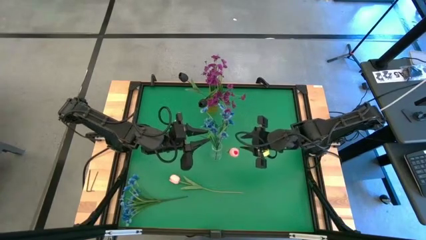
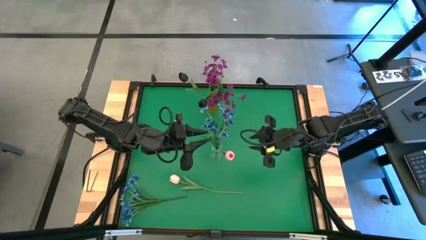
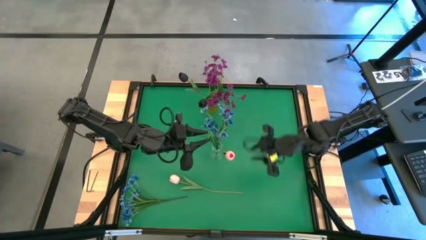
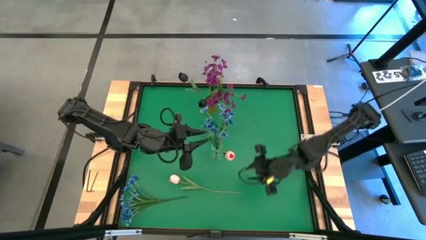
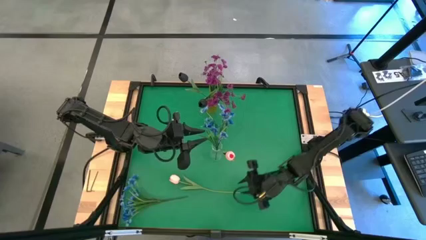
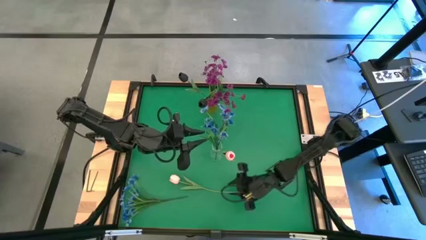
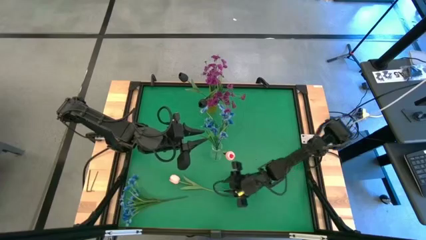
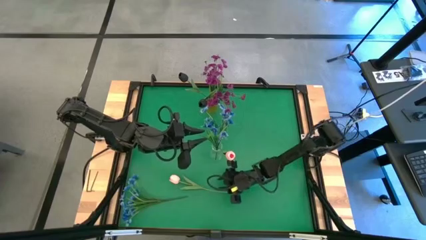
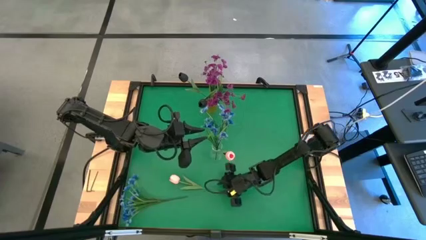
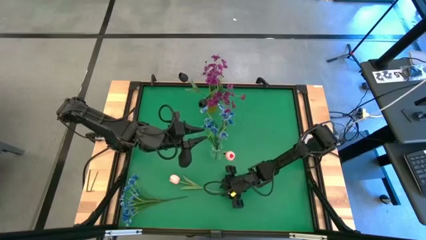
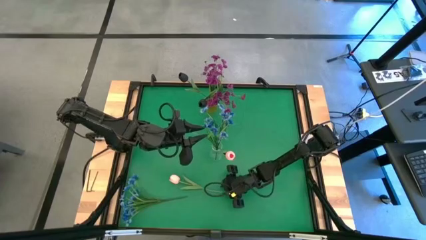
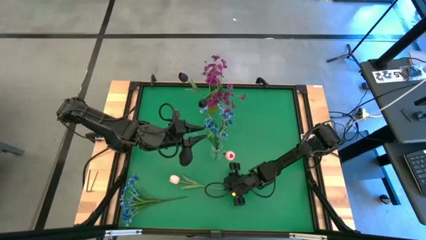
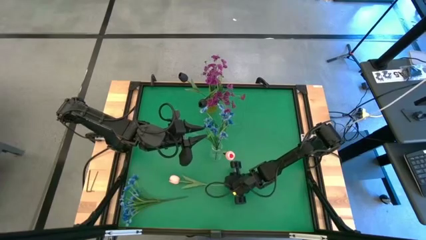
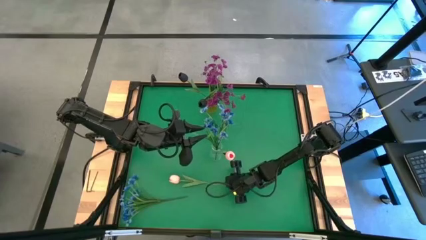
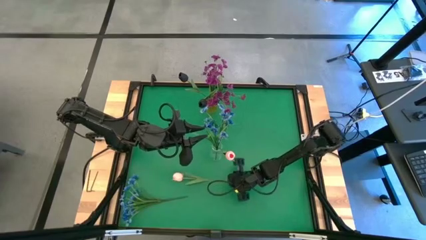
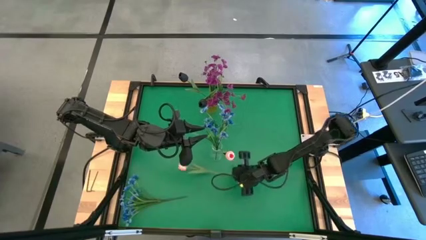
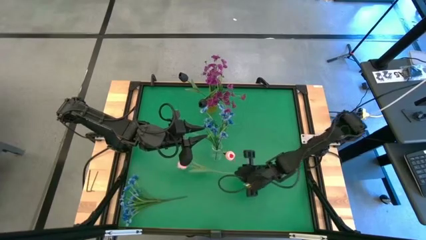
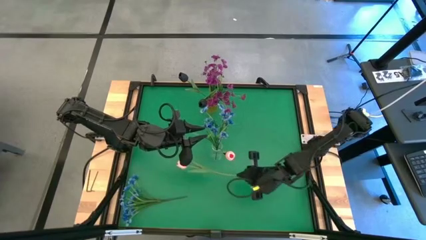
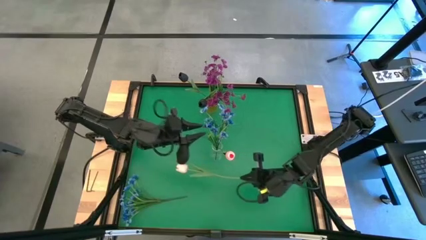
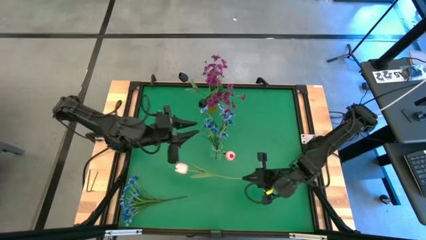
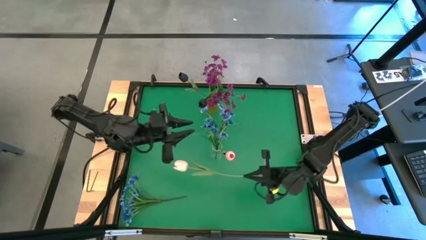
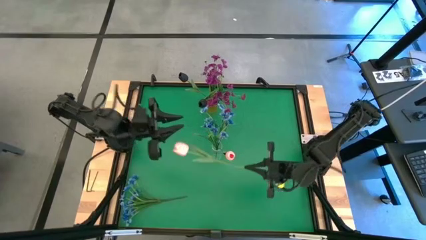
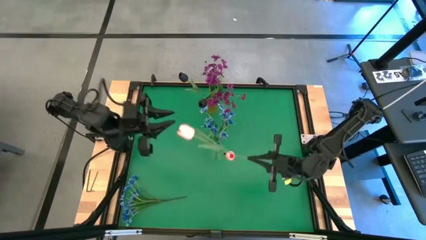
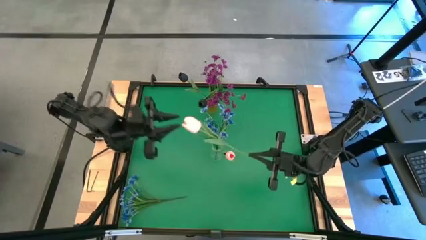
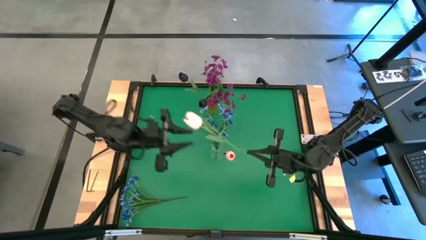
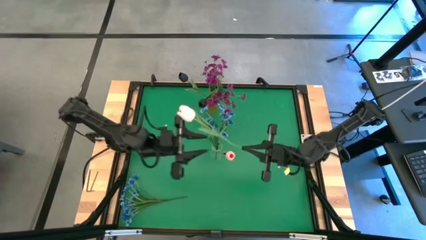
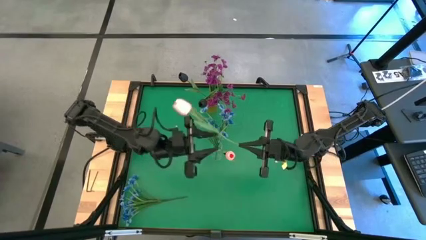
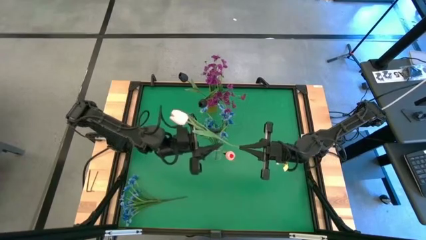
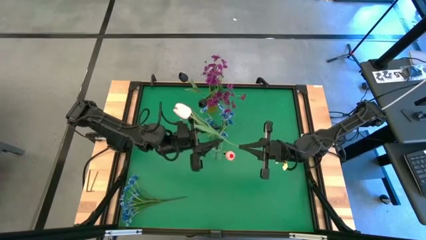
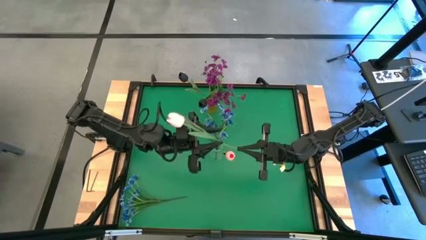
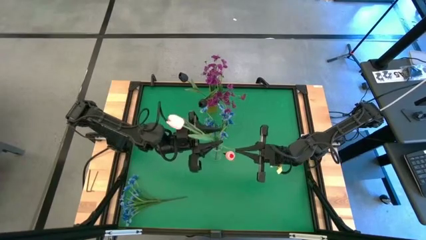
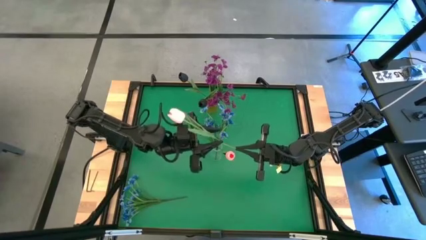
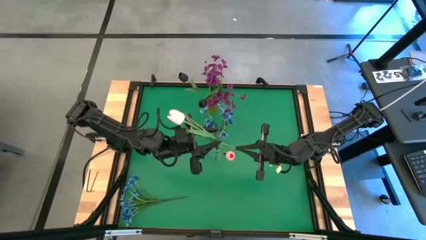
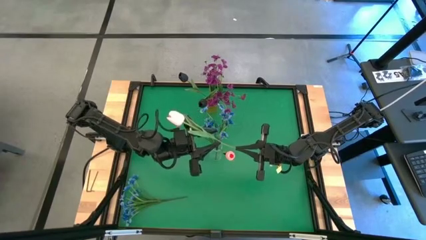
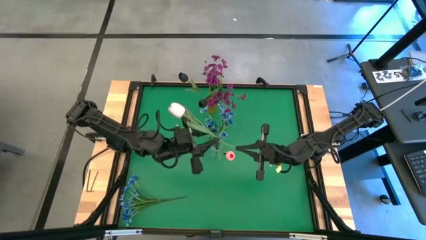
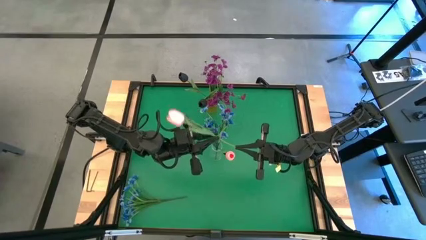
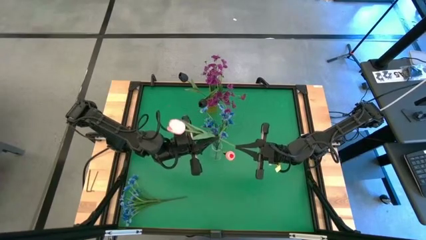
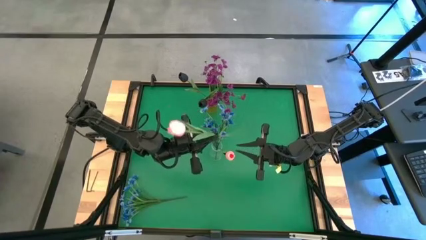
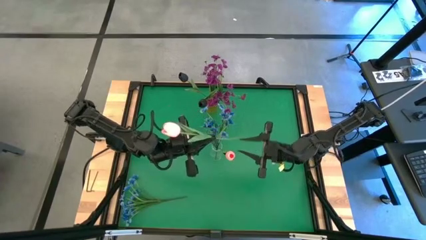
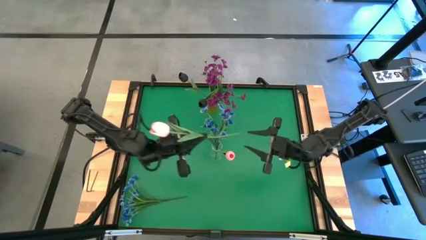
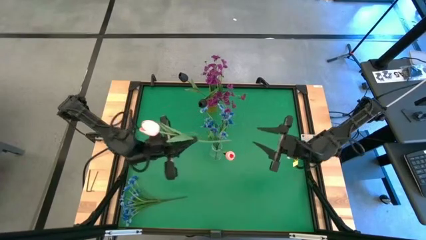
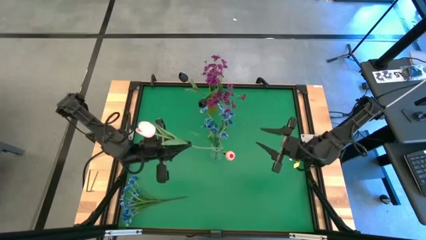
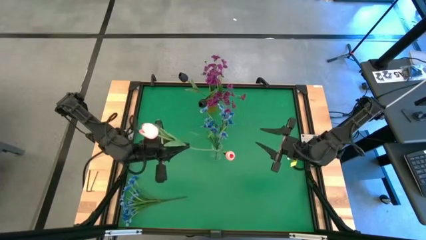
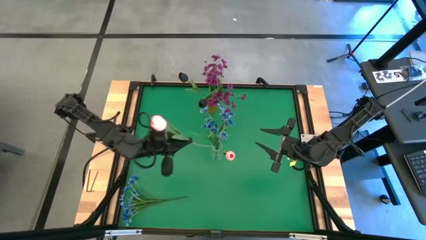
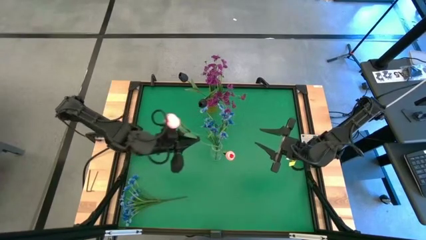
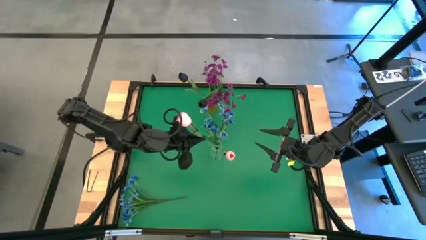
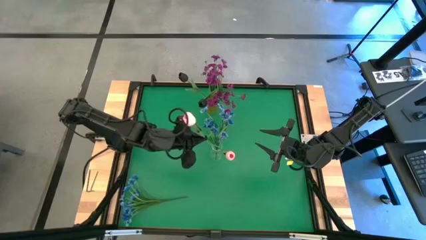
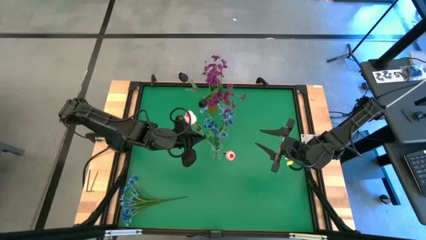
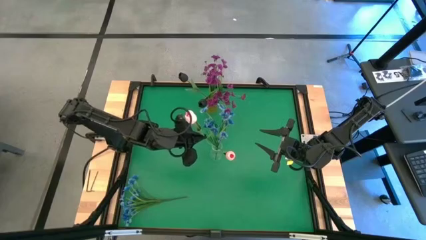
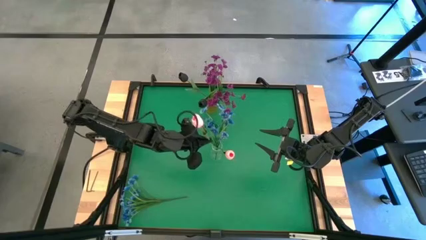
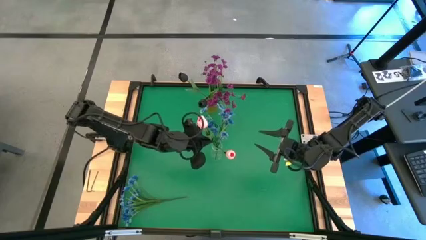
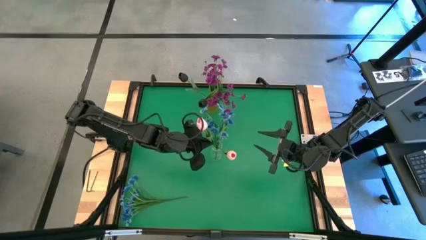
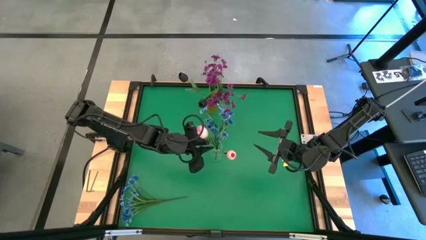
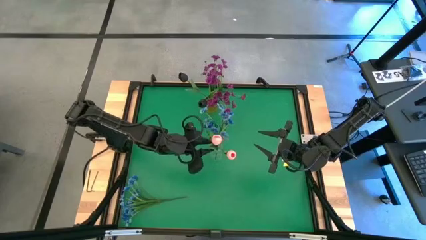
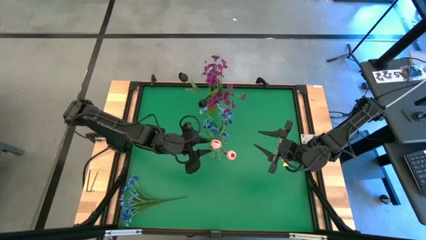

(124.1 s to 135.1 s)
Task: Sort flowers into vase by color
Put the pink flowers into the transparent vase

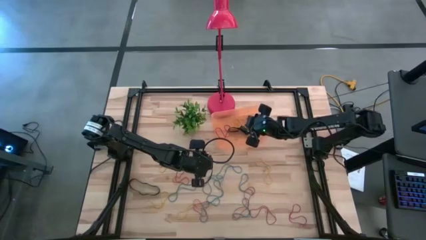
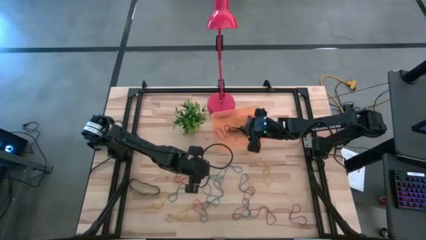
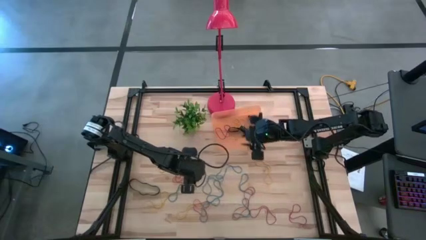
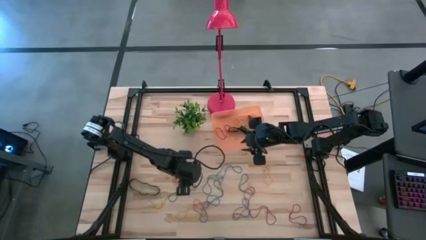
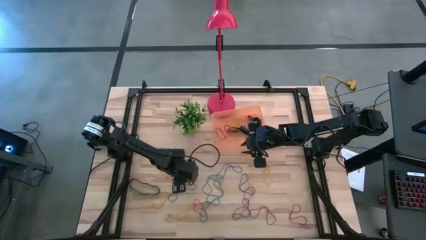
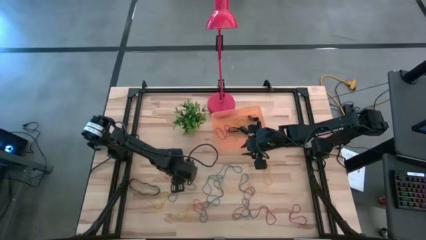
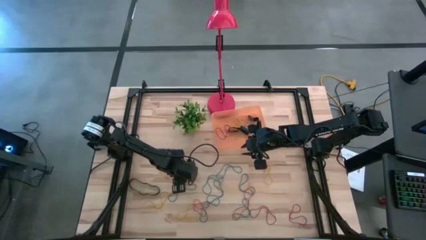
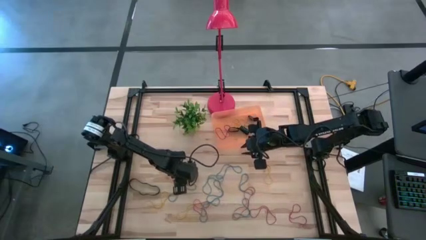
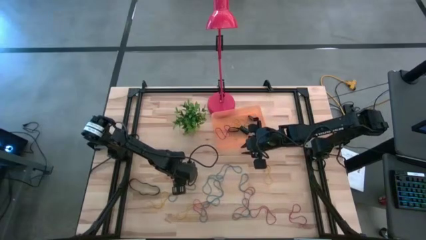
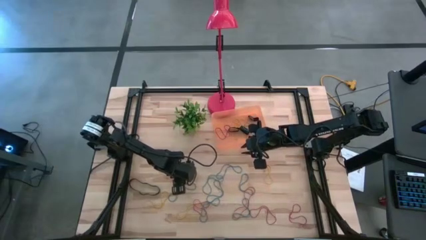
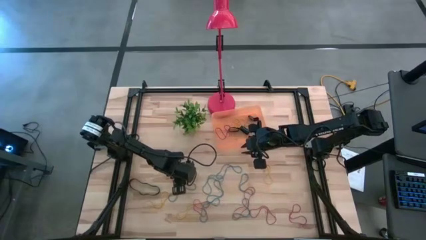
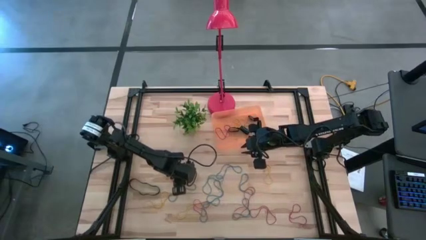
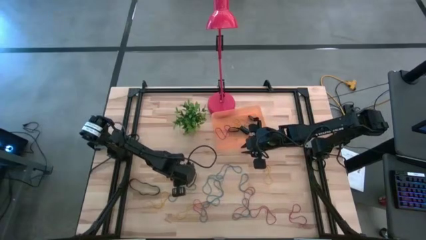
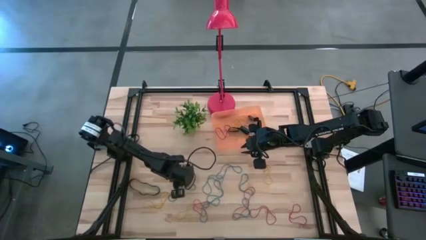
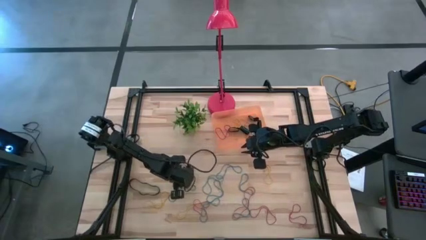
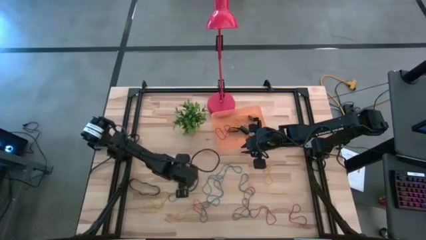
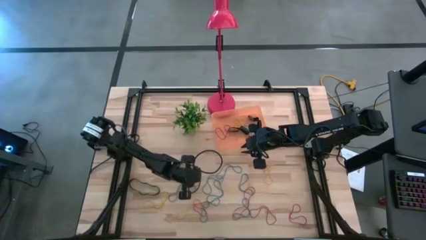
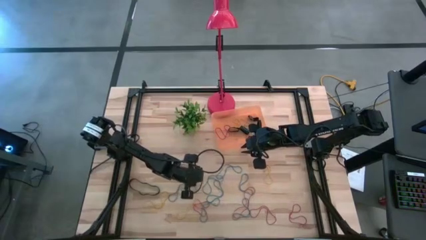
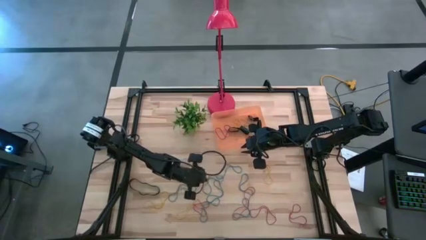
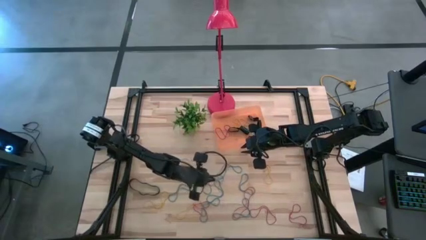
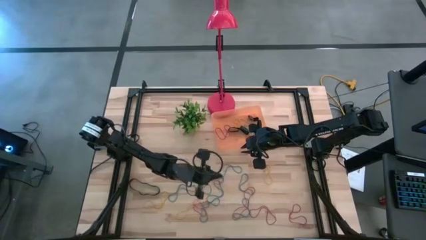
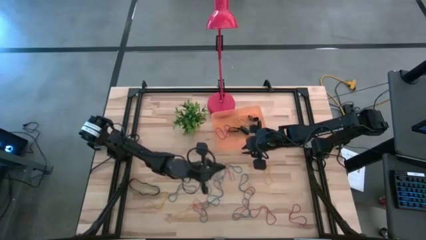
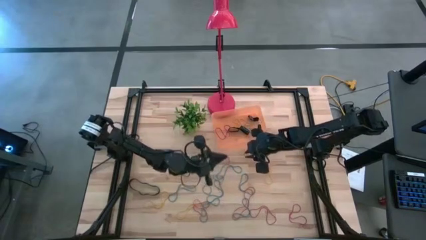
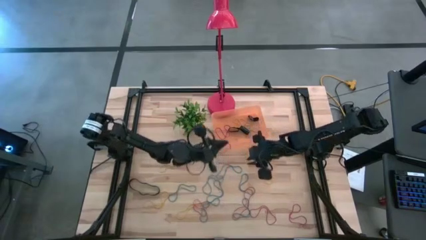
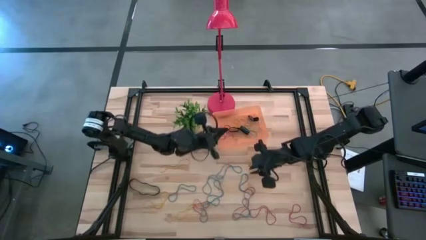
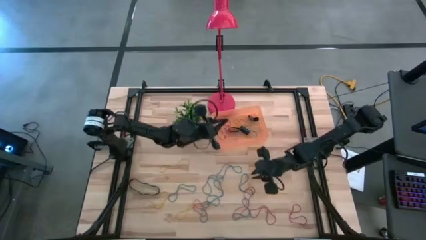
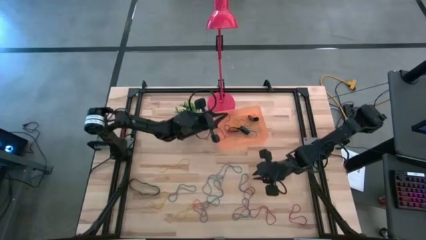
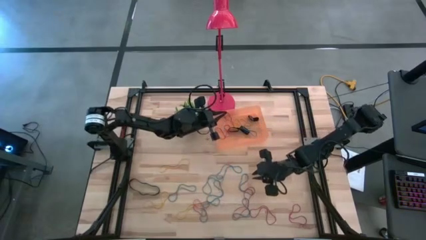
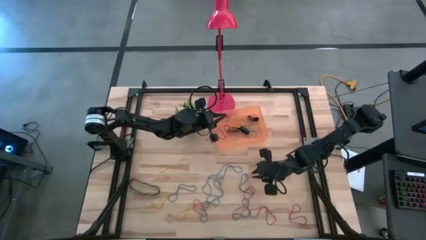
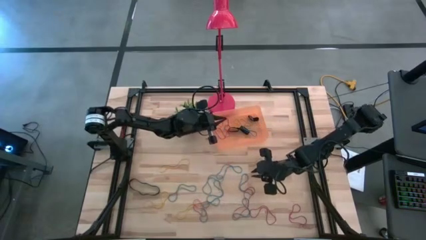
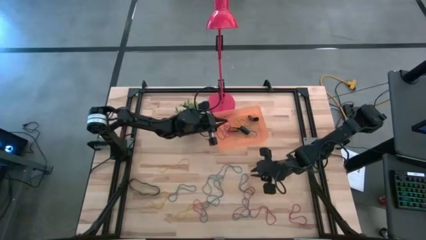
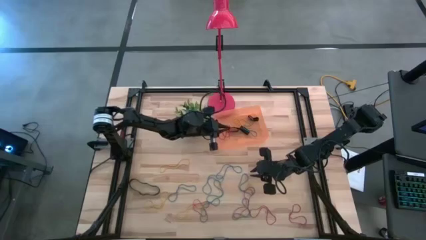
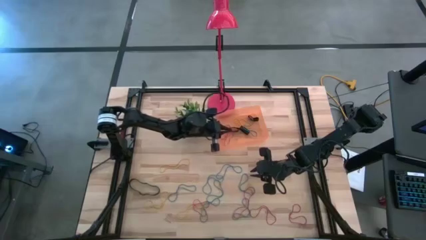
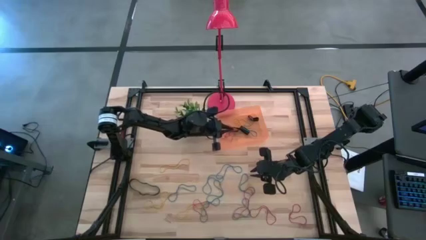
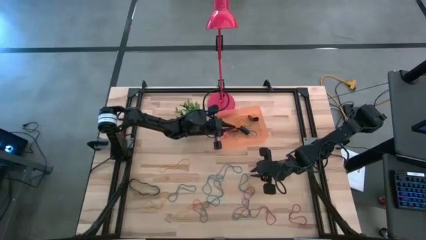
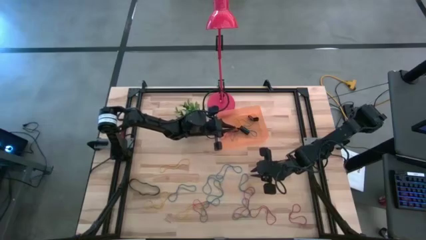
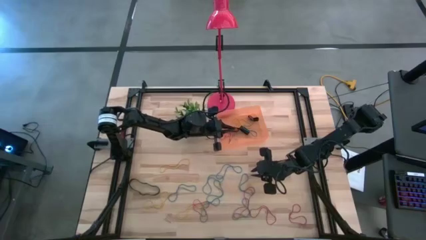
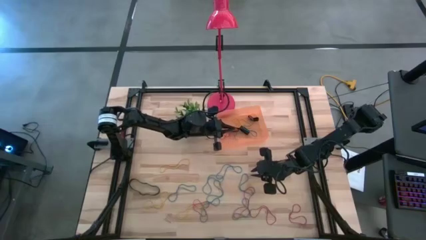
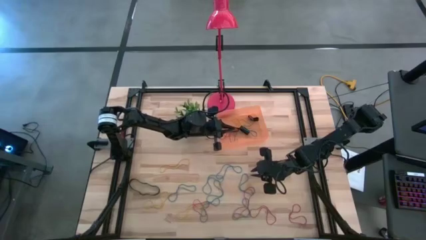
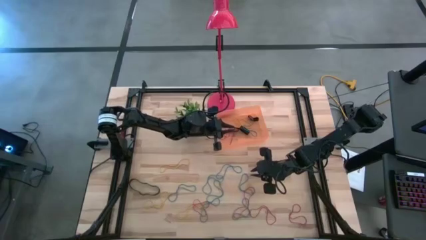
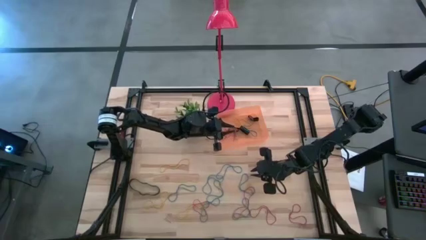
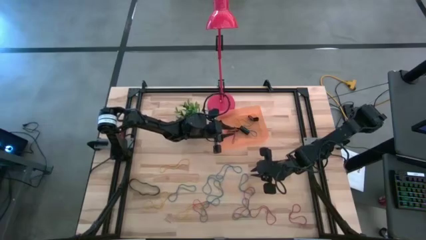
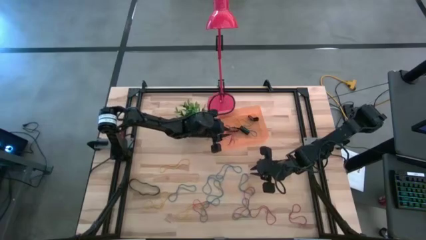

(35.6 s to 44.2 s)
Task: Pick and place rubber bands into bin
Put the red rubberband into the orange container
